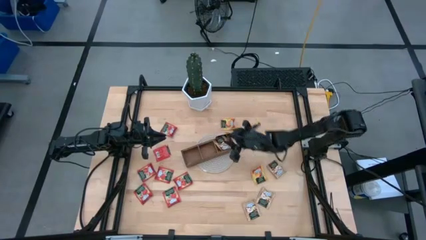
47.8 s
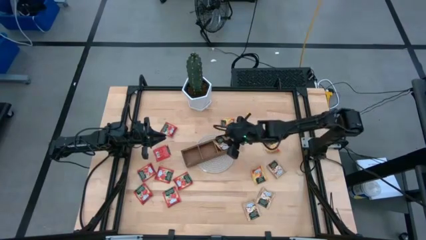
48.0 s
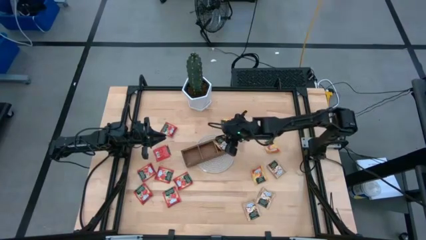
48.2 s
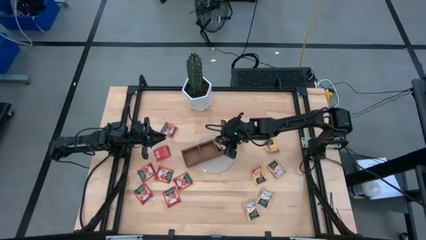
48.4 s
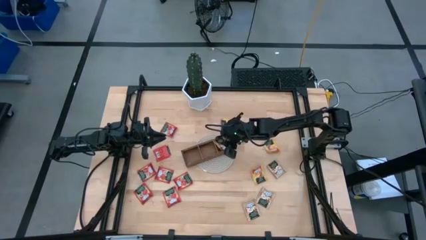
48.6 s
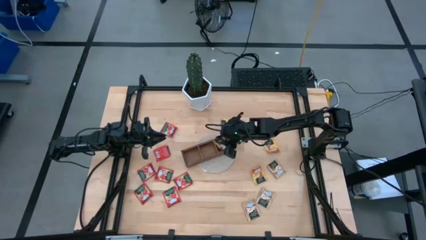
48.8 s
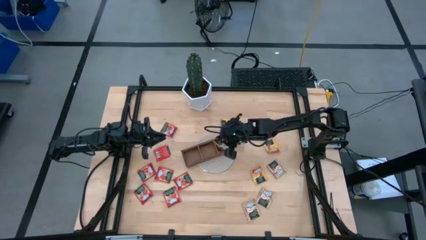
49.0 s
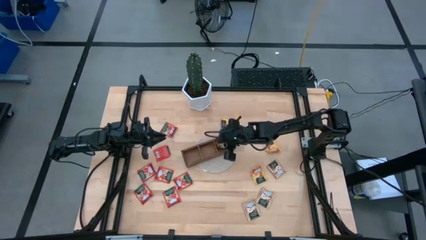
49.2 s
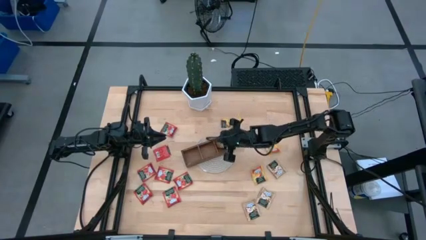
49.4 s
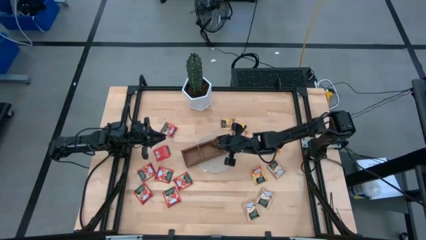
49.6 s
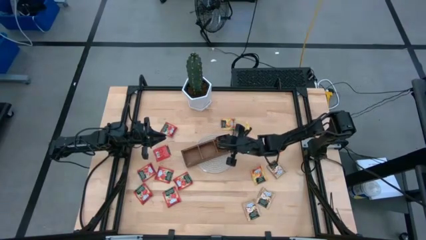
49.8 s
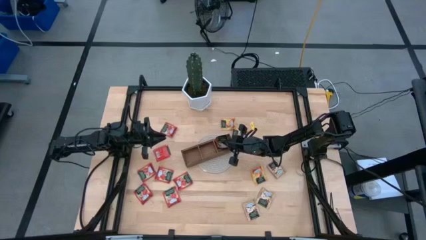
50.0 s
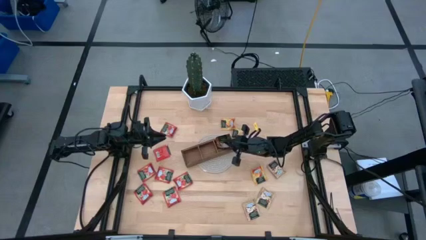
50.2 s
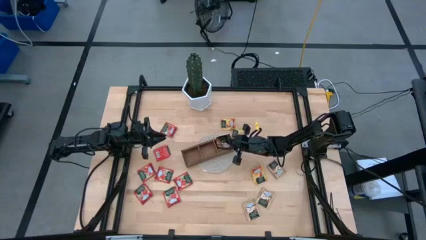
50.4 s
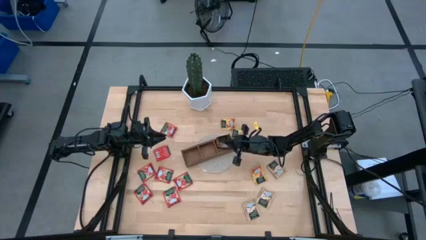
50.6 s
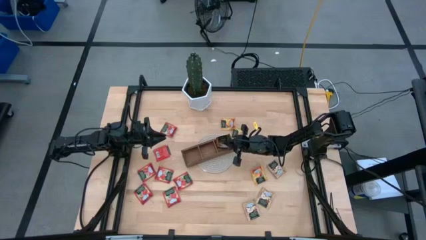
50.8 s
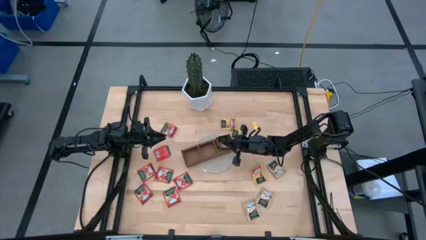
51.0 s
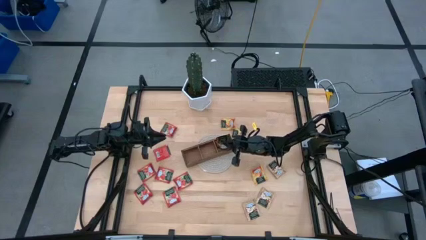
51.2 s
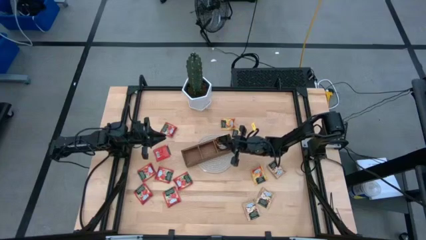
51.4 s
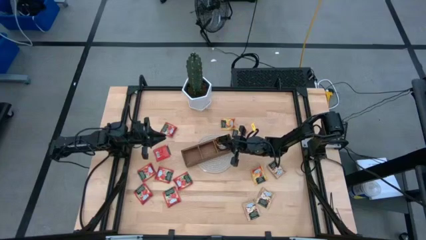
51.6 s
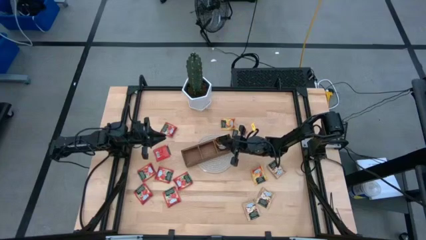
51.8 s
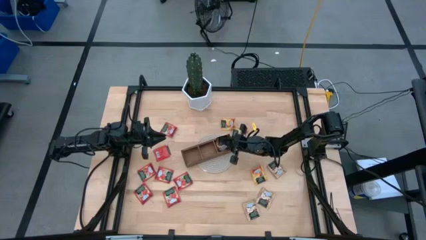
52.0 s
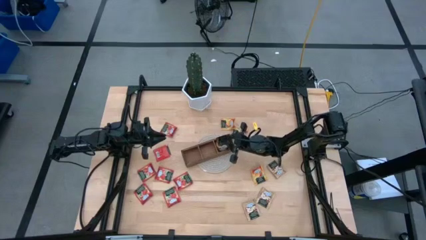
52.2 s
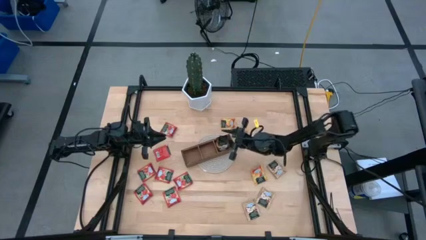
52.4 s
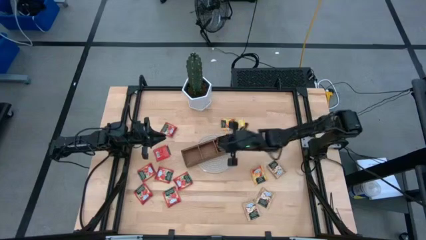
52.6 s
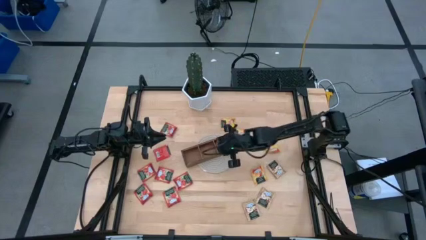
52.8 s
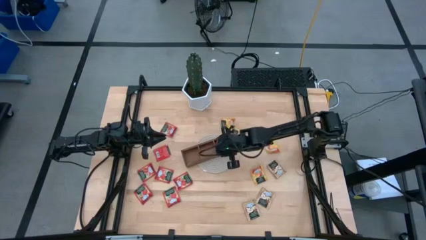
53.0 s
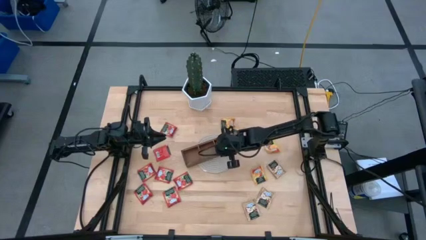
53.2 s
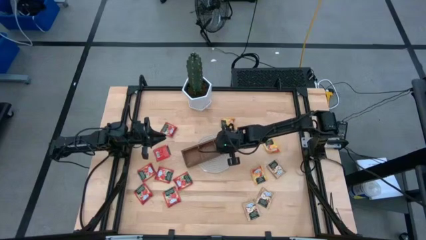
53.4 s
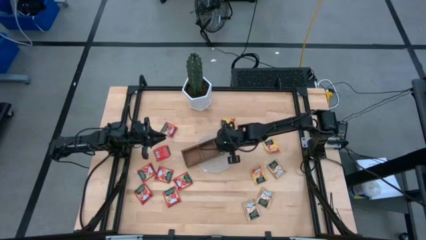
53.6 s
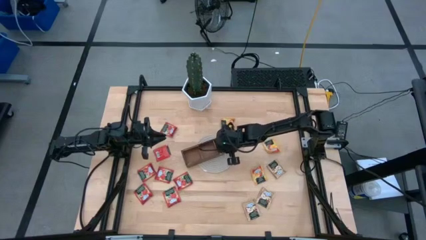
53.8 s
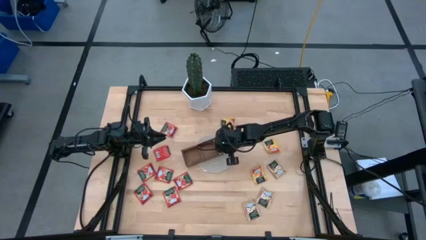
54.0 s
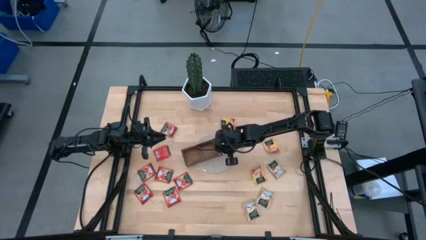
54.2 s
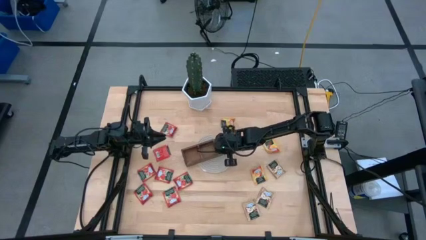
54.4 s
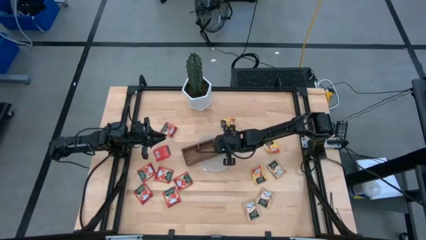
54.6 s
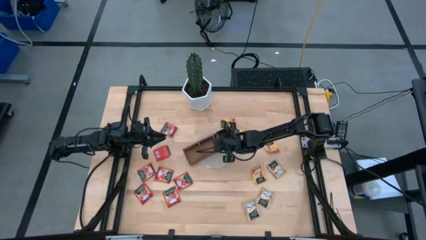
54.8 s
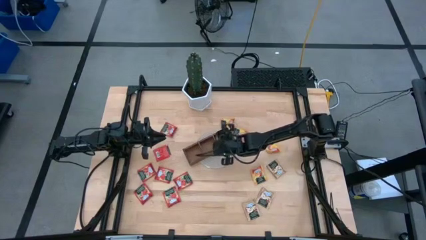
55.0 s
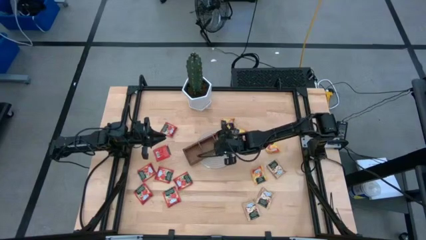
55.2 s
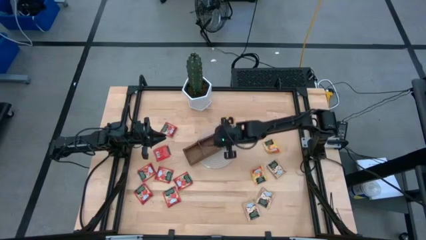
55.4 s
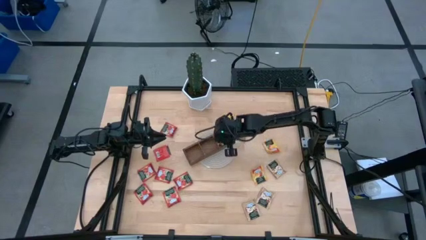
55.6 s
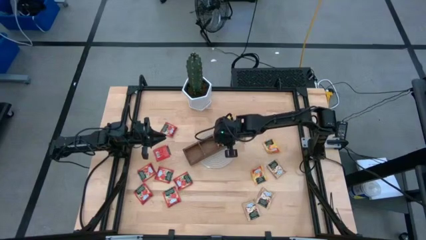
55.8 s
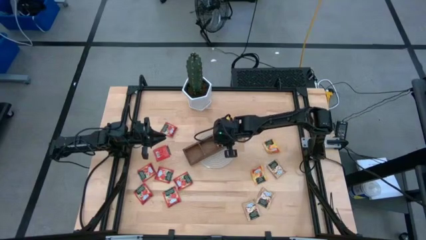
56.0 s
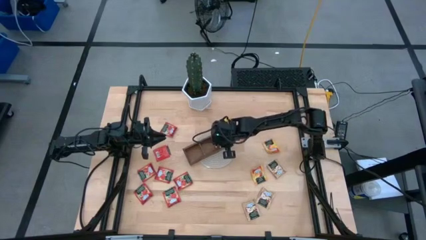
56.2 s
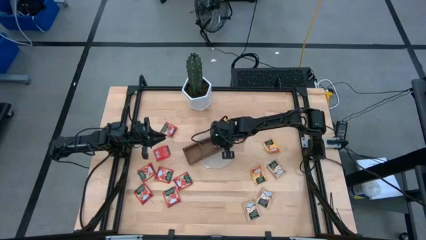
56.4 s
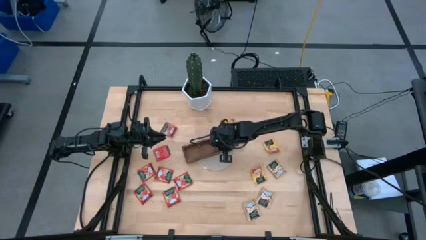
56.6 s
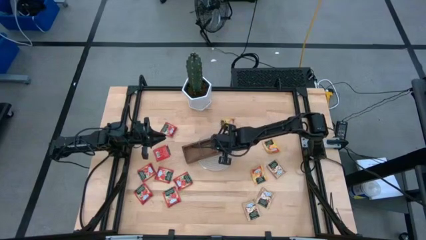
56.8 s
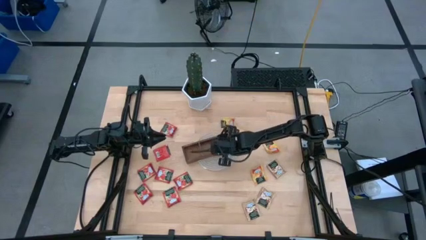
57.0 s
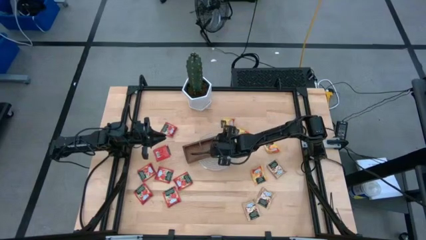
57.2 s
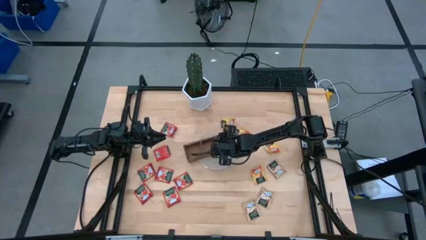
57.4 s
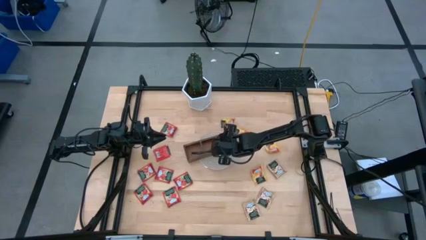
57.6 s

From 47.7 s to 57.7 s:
Task: Pick & Place Tea
Put the brown tea bag into the right section of the wooden organizer

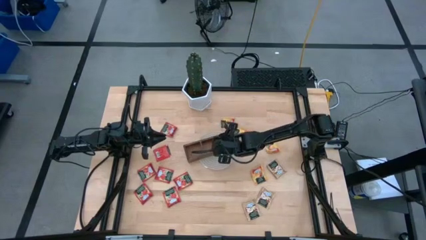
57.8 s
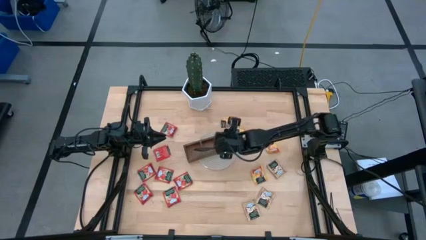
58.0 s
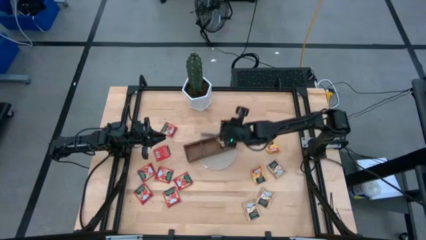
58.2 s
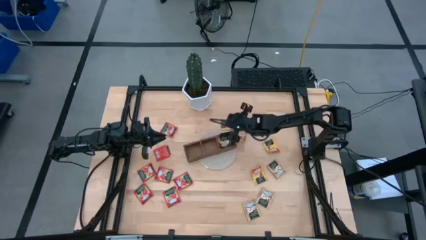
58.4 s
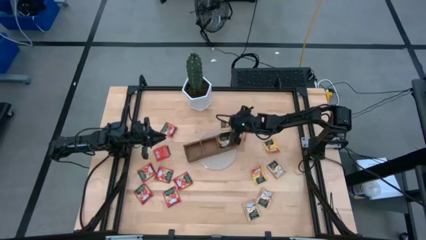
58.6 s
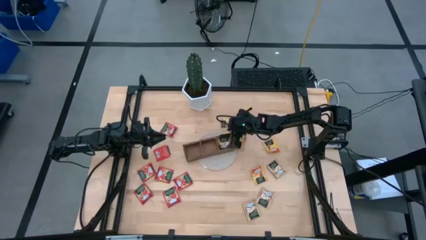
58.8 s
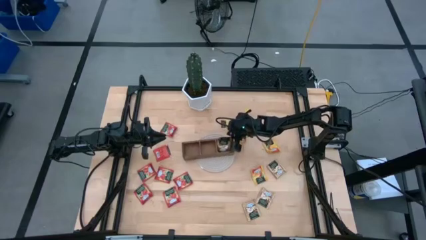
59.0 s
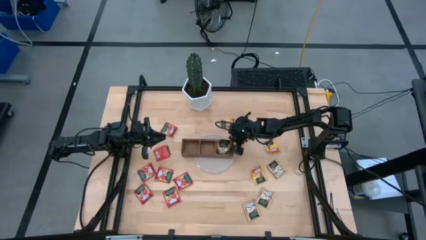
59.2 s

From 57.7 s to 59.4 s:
Adjust the wooden organizer

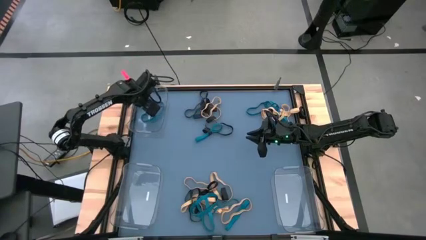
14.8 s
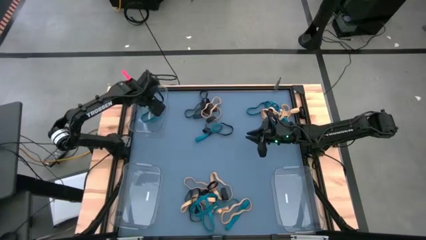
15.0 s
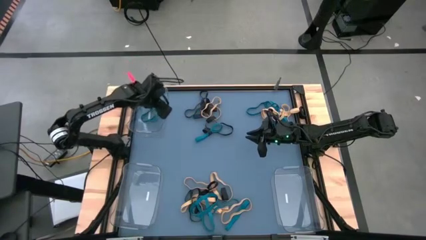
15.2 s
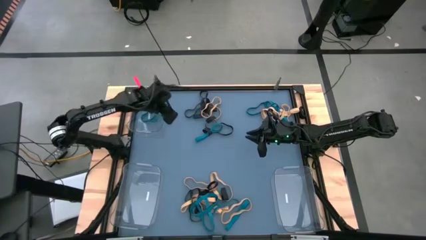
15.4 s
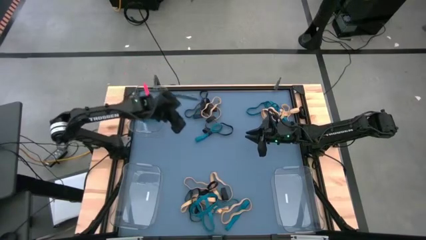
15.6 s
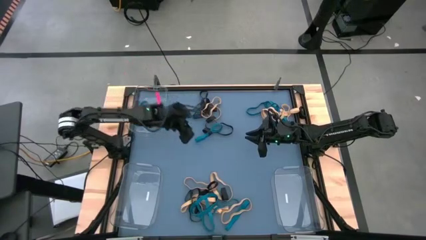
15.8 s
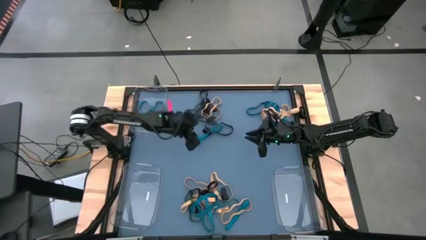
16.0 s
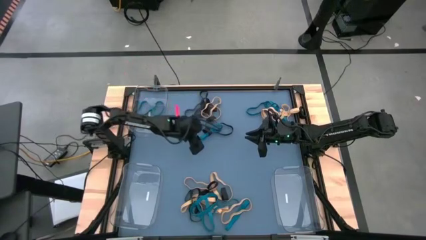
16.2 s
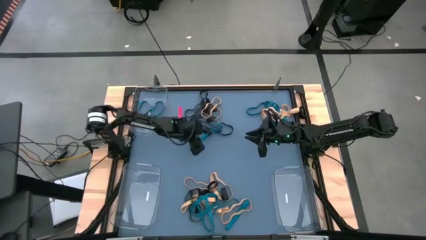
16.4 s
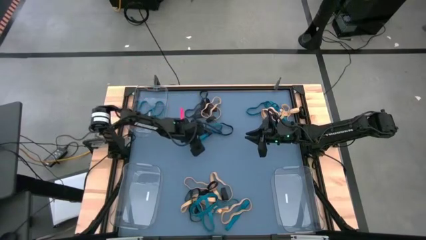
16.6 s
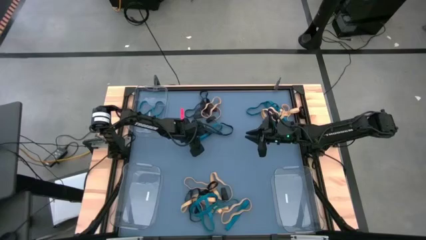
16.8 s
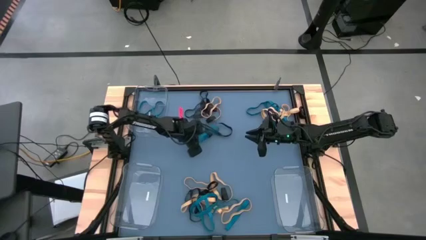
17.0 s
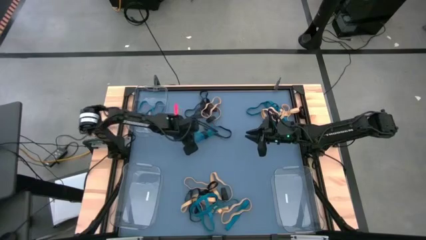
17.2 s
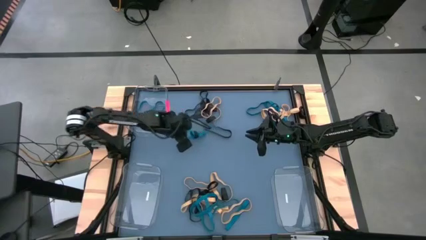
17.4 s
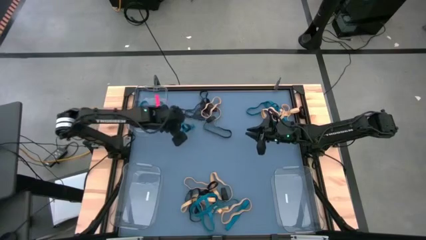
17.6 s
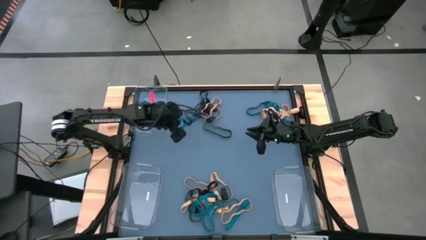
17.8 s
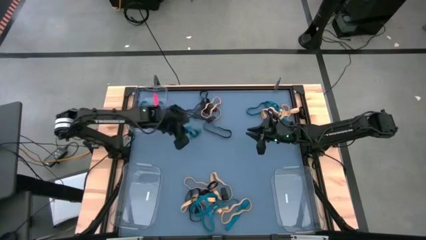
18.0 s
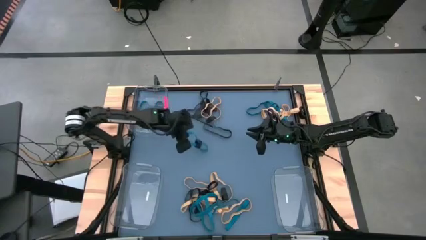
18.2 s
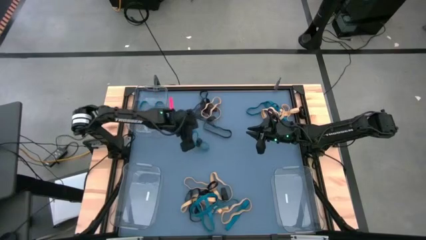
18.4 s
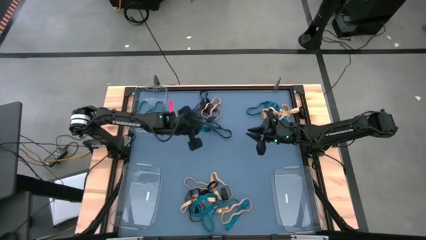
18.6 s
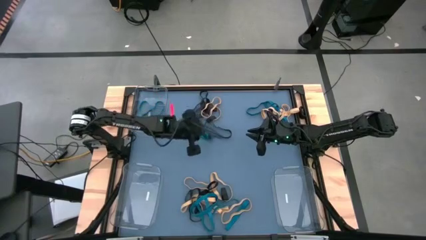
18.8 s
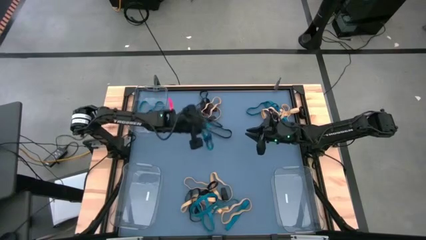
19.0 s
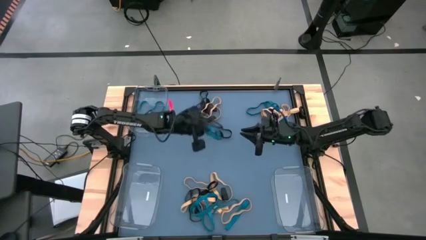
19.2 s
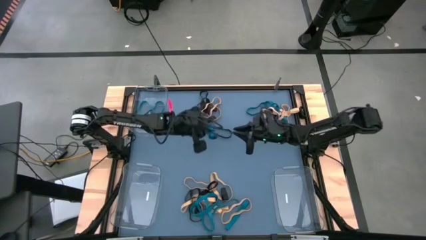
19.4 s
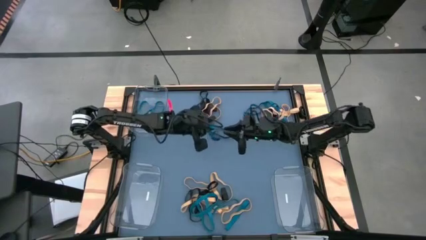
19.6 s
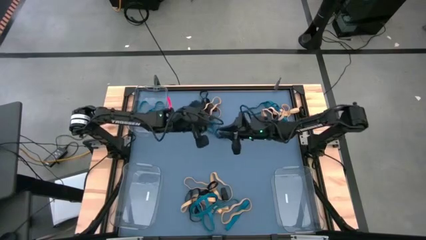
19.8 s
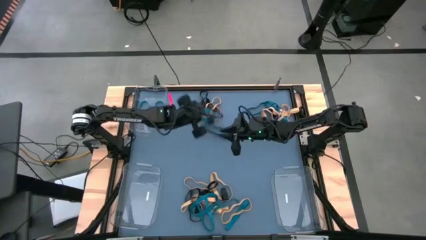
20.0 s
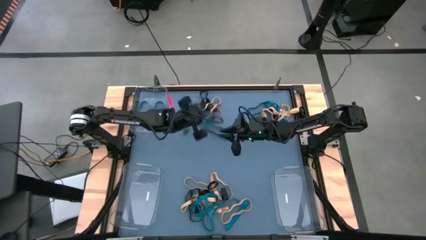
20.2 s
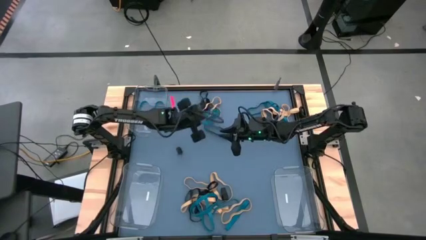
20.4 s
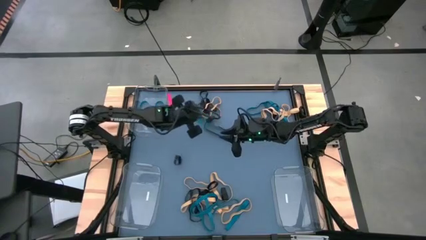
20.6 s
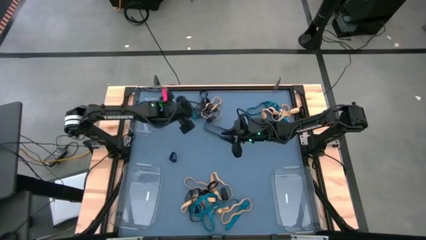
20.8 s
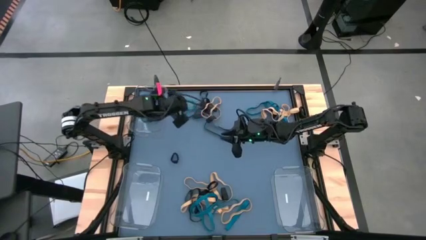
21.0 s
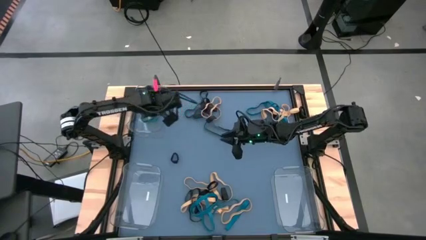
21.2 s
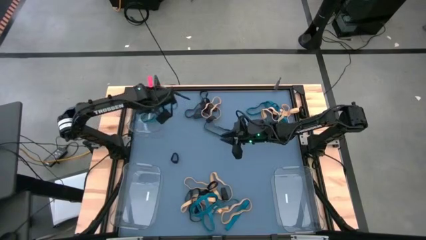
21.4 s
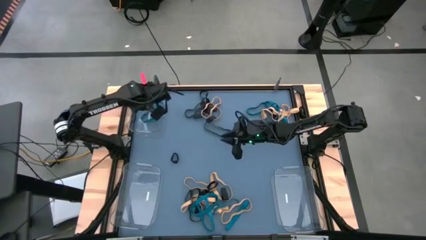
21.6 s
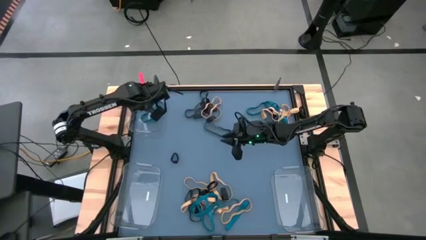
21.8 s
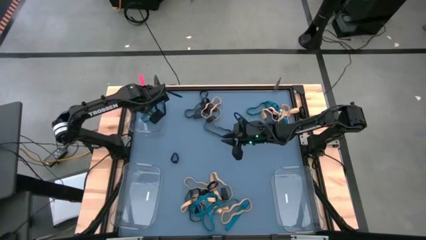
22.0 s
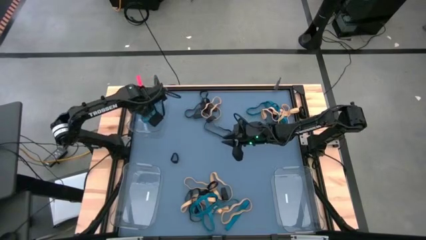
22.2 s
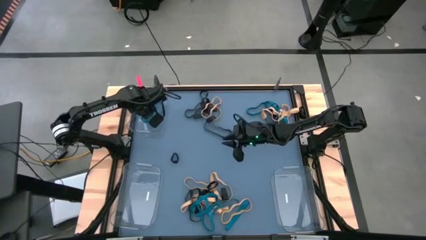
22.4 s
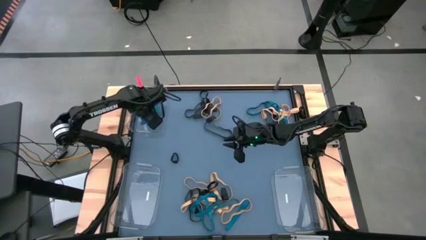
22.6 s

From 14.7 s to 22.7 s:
Task: Sort rubber bands into baskets
Put the blue rubber band into the top transparent bin
